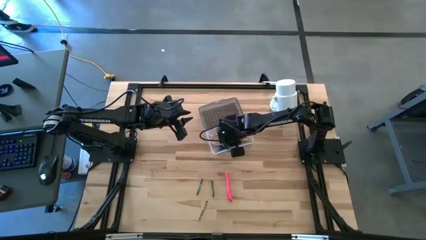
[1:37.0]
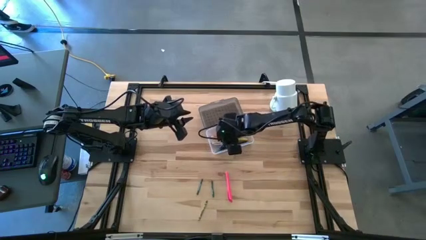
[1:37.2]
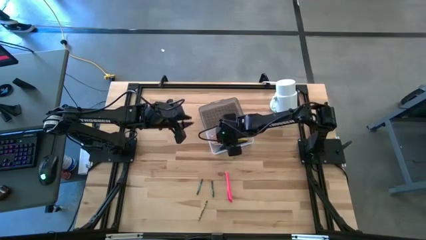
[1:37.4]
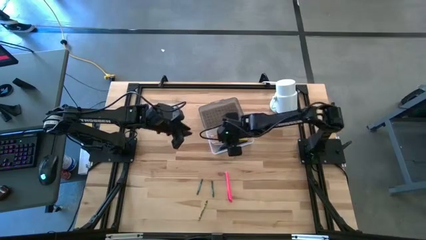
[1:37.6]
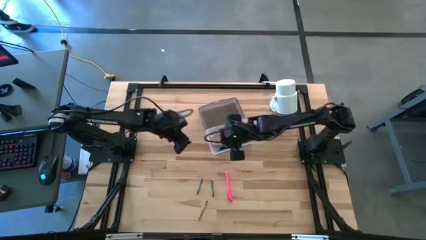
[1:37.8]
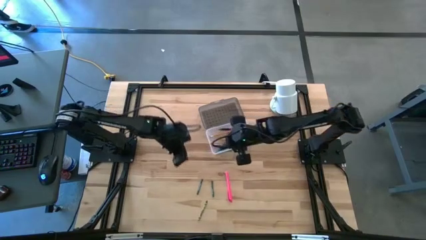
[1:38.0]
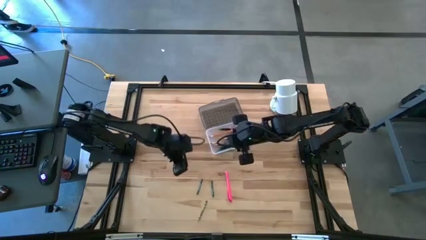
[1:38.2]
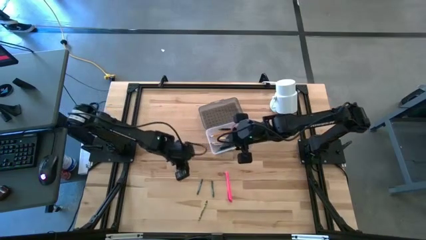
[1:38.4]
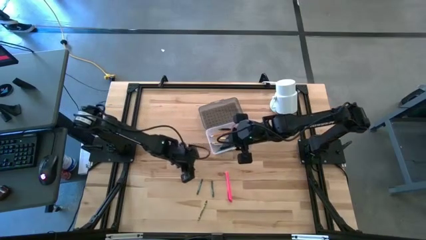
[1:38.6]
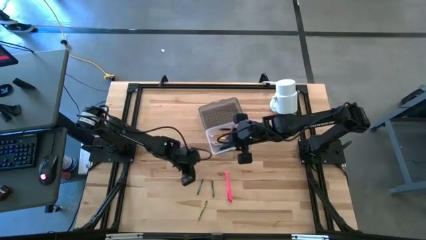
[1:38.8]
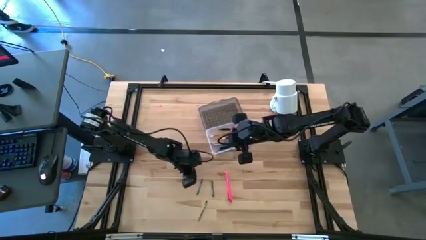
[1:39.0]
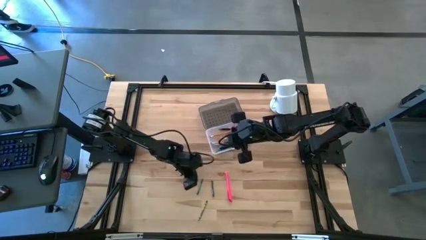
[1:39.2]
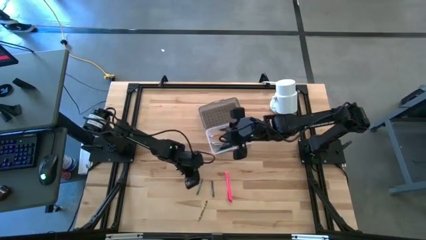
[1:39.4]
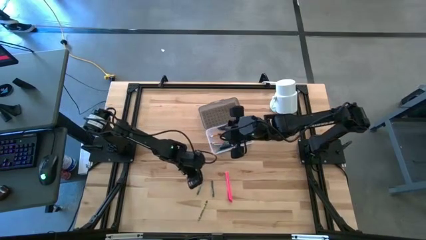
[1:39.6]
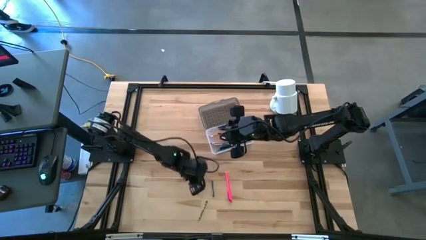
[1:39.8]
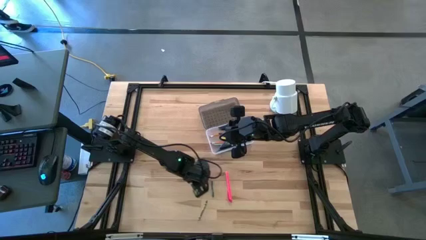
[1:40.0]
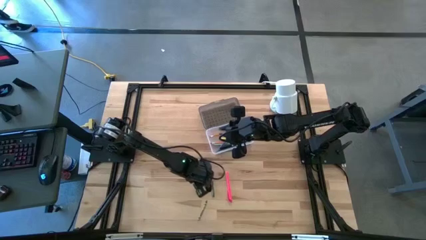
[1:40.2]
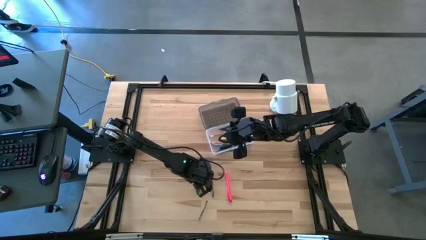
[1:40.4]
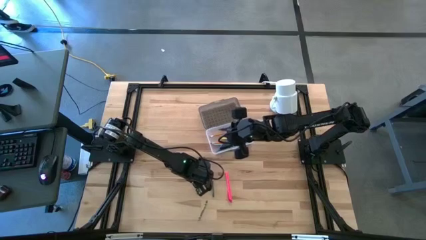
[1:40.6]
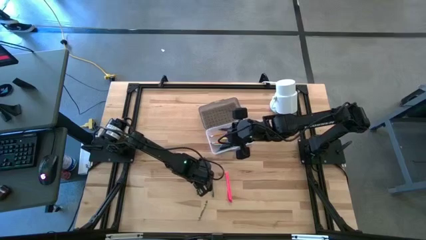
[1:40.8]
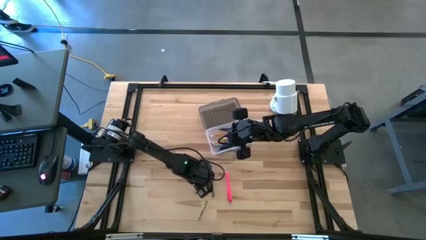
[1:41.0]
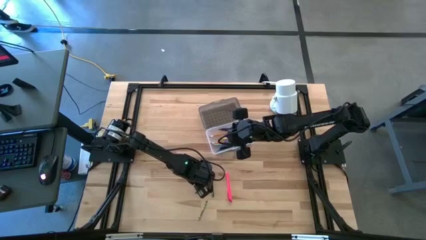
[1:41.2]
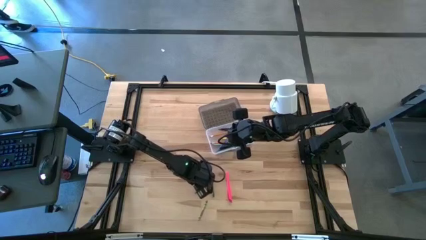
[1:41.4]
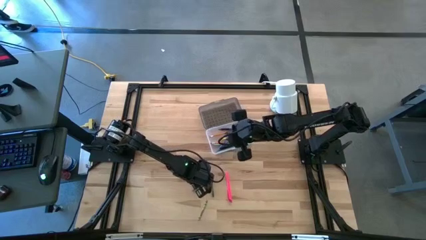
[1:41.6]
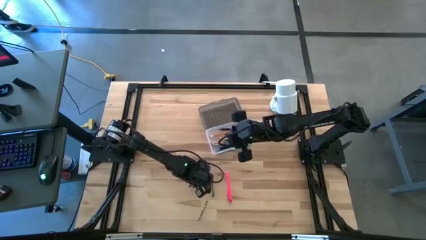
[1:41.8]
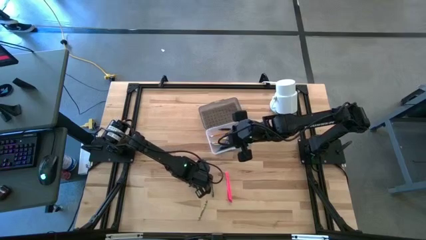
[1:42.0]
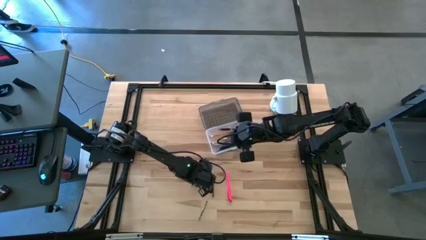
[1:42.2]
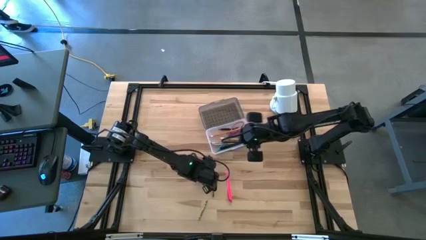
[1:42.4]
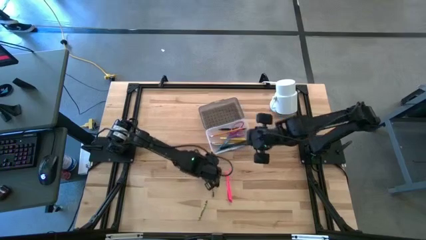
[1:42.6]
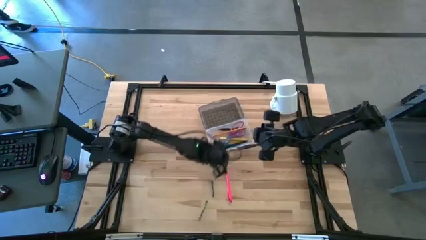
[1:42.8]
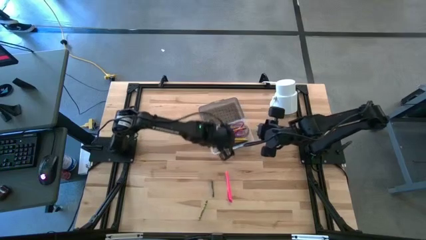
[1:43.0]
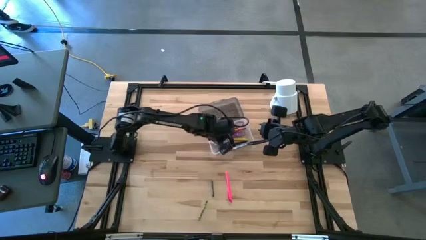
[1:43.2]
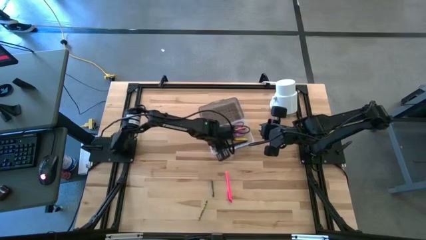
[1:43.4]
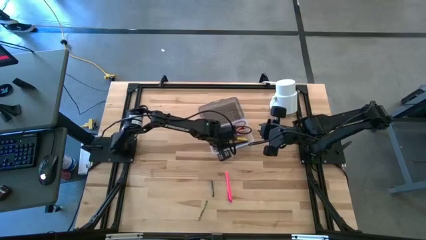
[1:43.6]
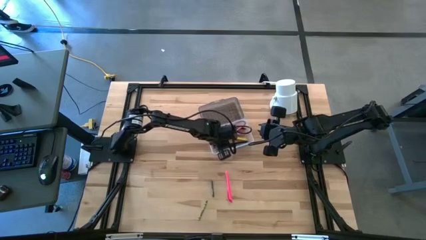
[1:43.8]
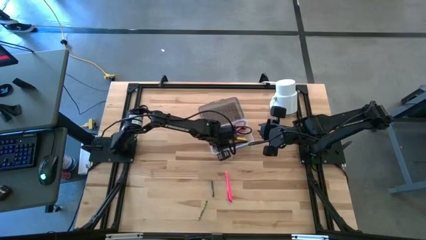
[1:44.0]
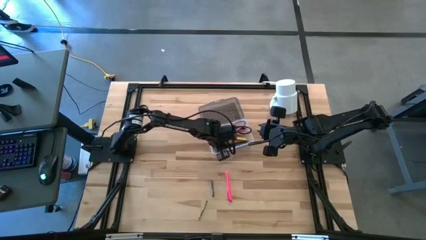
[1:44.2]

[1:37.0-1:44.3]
Task: Pick & place school supplies into a supply box
Put the left green crayon into the gray supply box

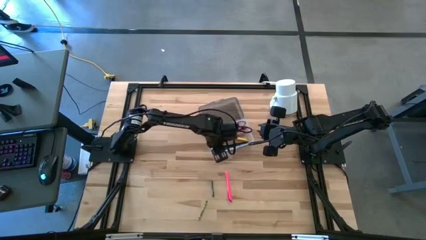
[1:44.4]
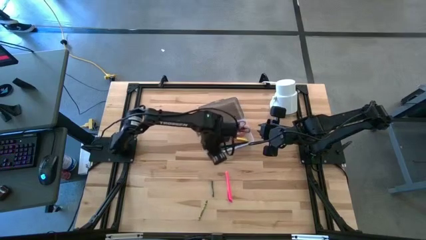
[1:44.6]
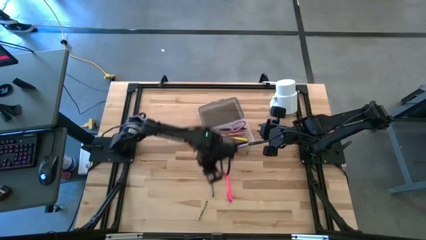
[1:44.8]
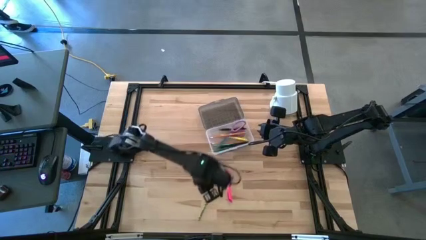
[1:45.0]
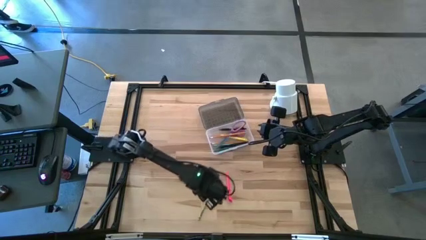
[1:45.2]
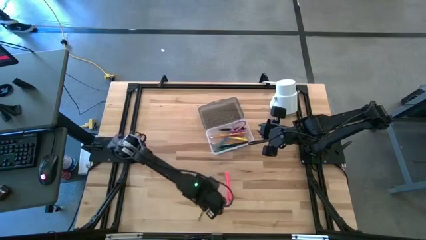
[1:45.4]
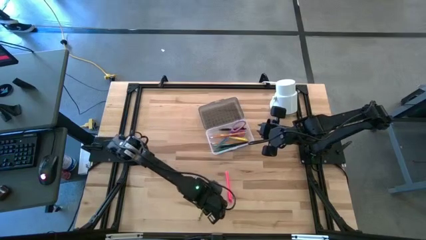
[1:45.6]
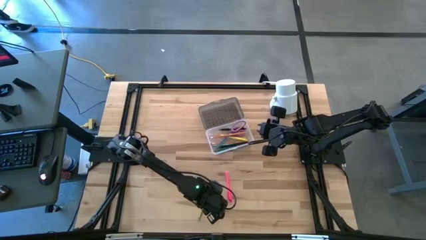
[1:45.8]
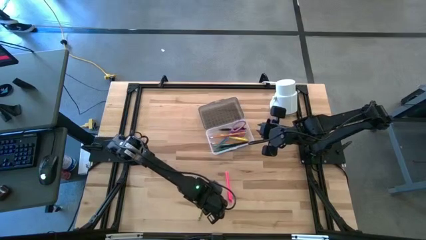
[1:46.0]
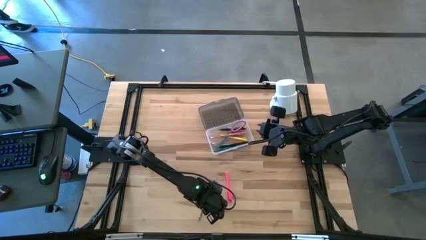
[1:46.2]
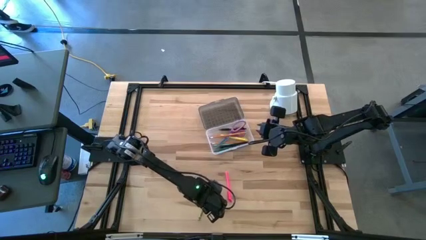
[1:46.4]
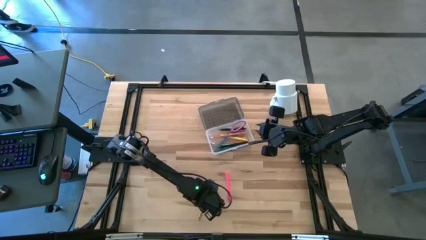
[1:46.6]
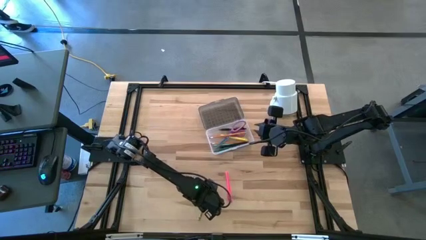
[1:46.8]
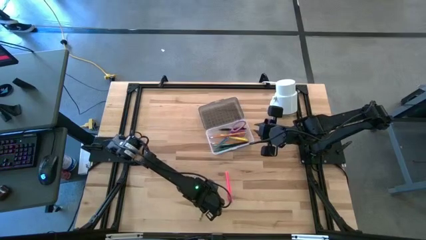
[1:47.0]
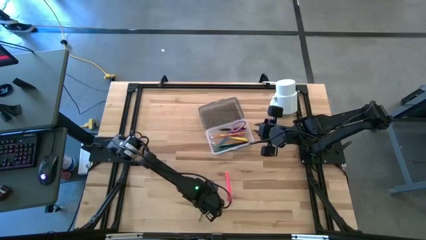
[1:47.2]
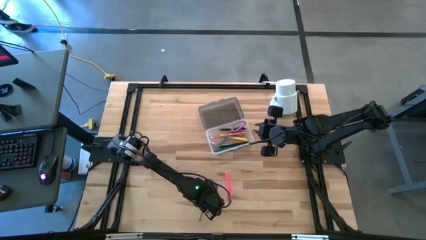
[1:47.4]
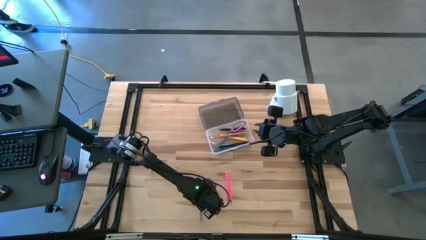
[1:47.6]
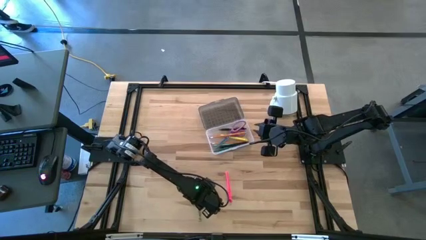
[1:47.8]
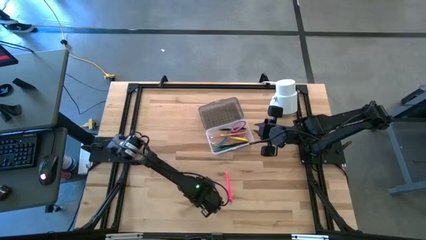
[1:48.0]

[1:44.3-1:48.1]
Put the light green crayon into the gray supply box

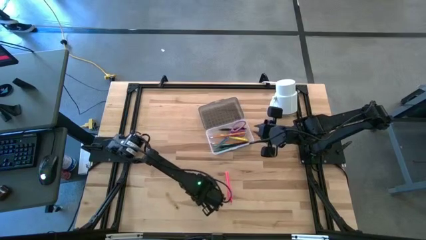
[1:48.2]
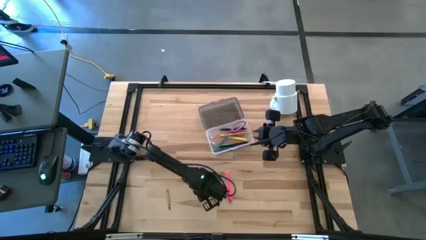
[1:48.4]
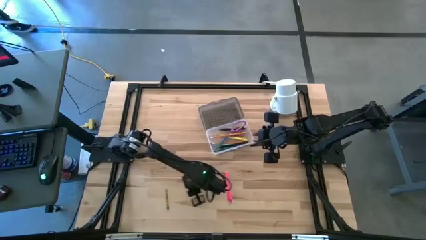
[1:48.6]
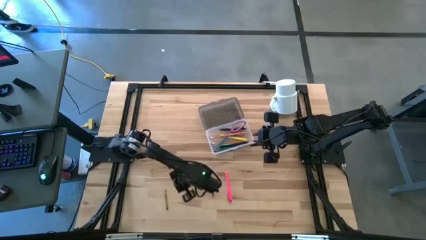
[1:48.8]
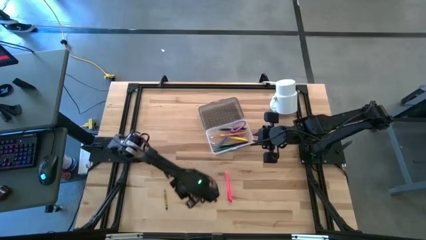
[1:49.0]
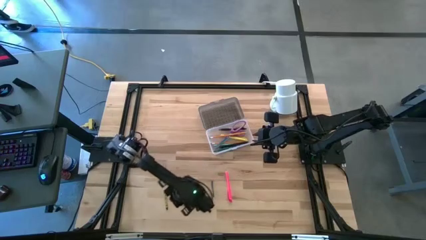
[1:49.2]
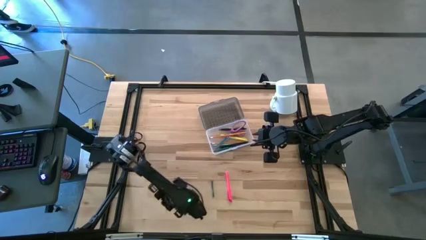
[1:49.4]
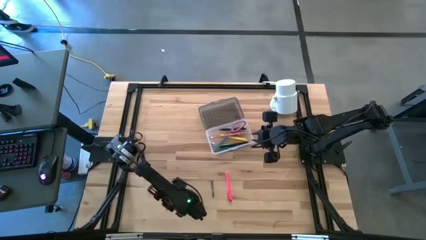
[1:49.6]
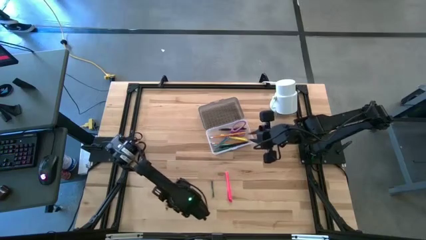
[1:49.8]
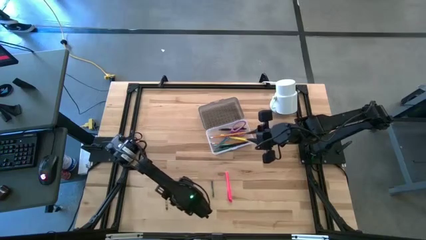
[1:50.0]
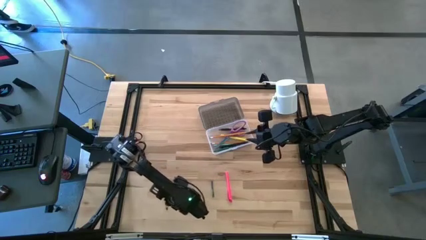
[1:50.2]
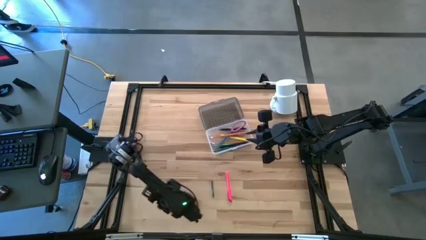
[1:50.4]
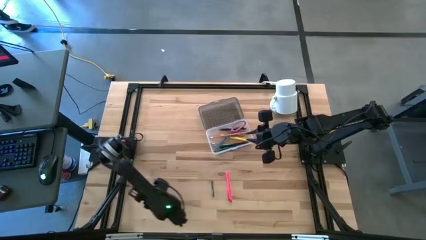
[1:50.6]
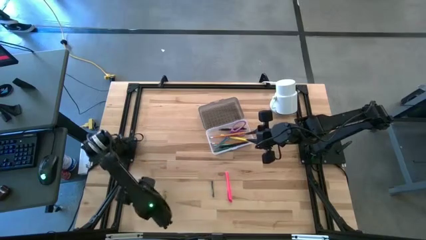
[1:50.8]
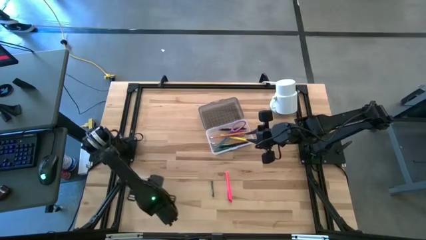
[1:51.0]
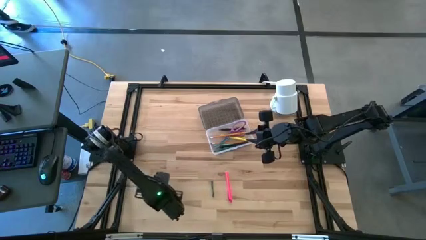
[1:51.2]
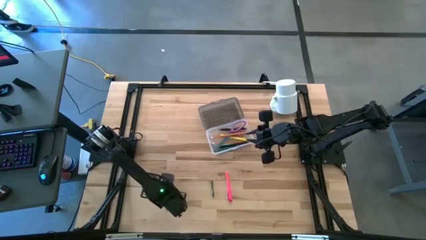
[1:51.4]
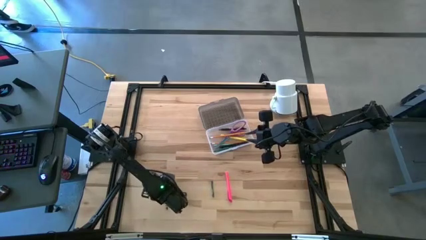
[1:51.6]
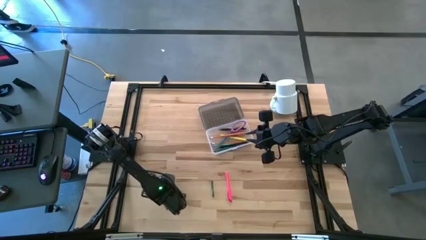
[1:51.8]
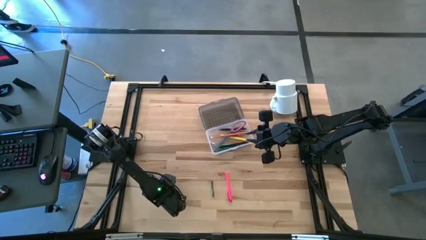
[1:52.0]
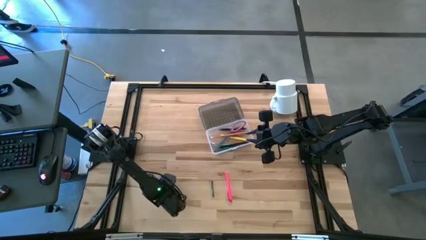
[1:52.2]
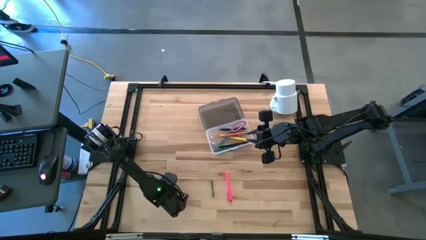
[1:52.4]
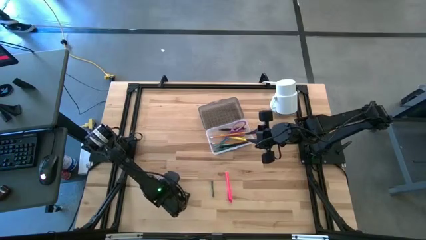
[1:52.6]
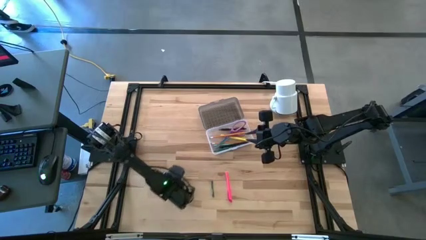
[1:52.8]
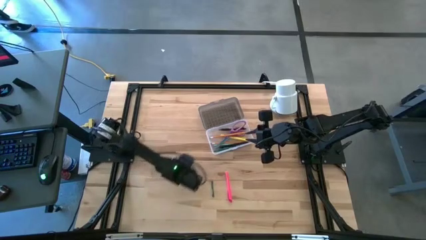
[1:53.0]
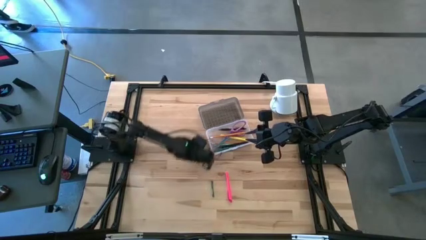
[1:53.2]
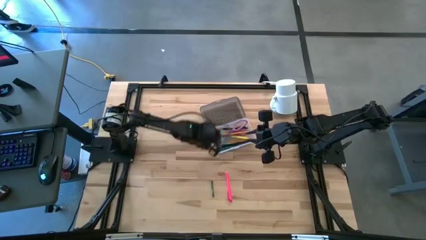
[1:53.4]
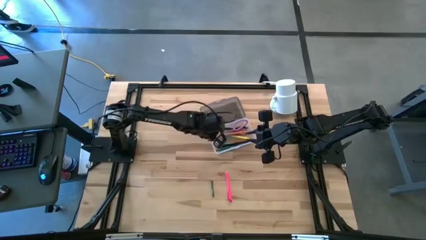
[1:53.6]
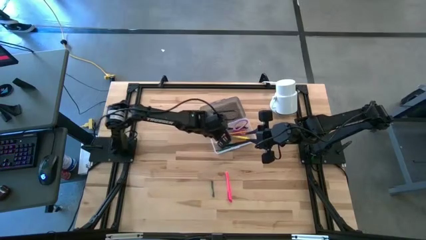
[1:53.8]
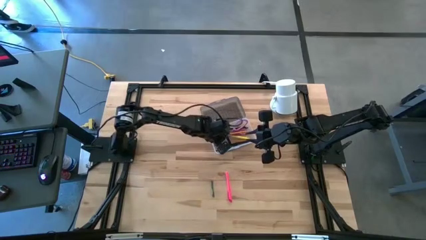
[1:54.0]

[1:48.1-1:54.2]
Put the light green crayon into the gray supply box
